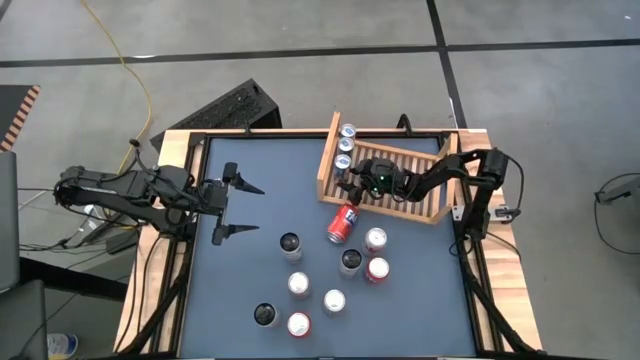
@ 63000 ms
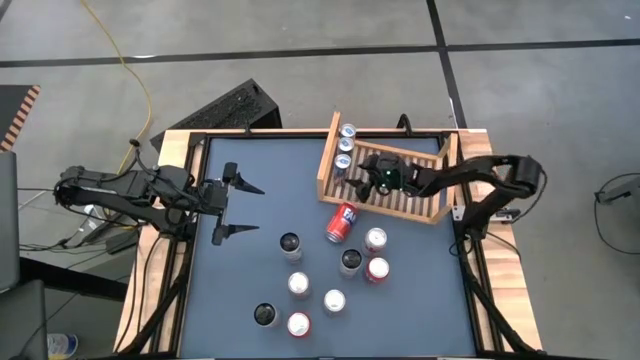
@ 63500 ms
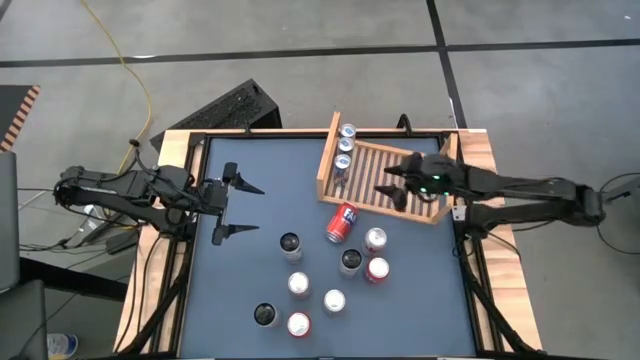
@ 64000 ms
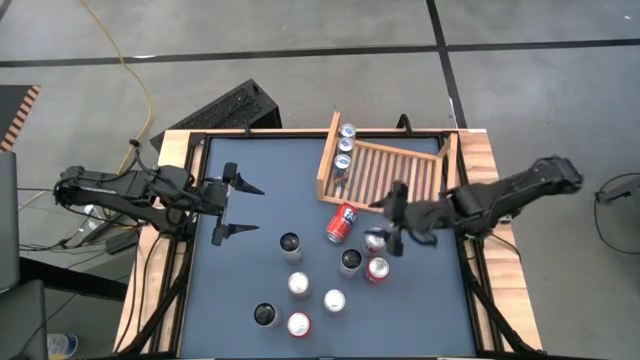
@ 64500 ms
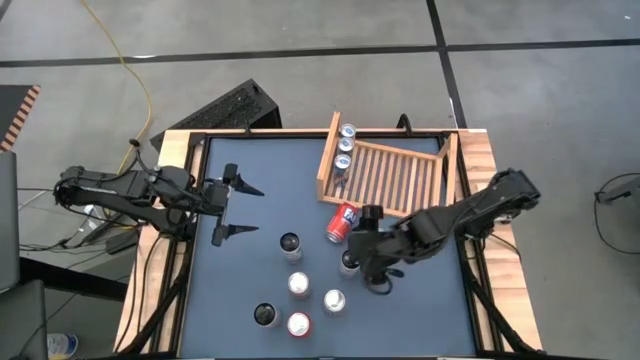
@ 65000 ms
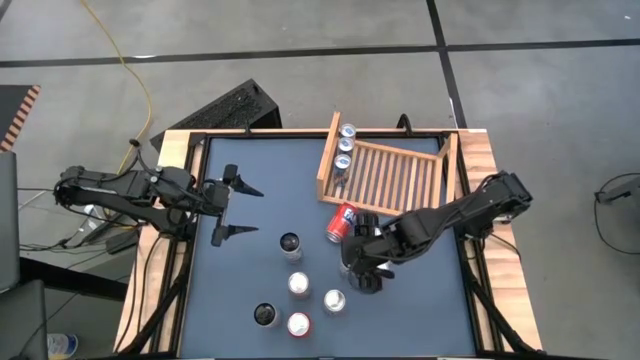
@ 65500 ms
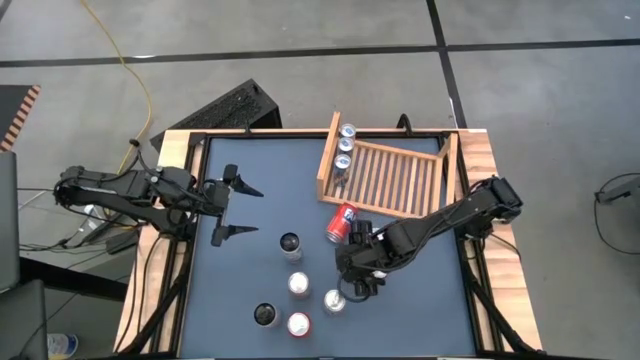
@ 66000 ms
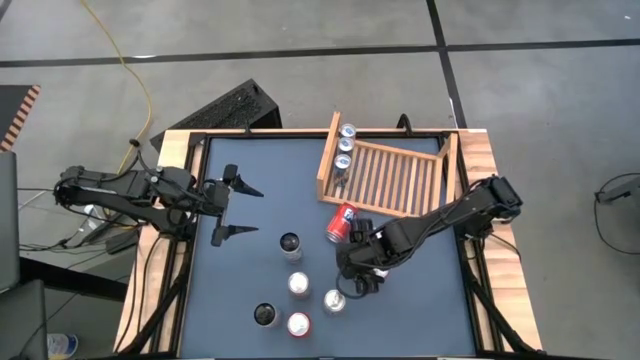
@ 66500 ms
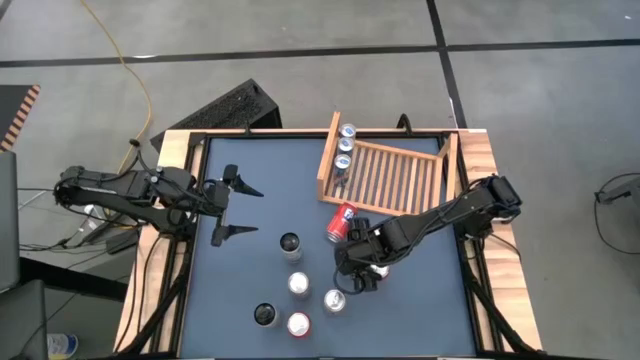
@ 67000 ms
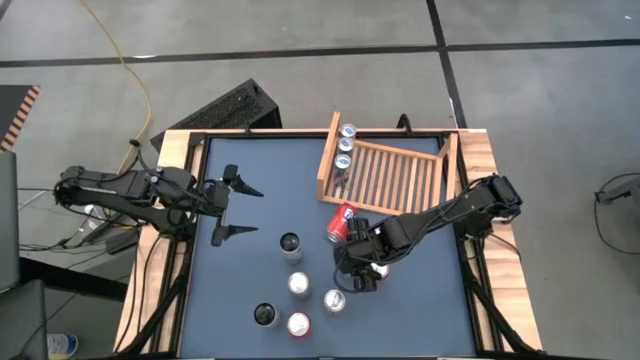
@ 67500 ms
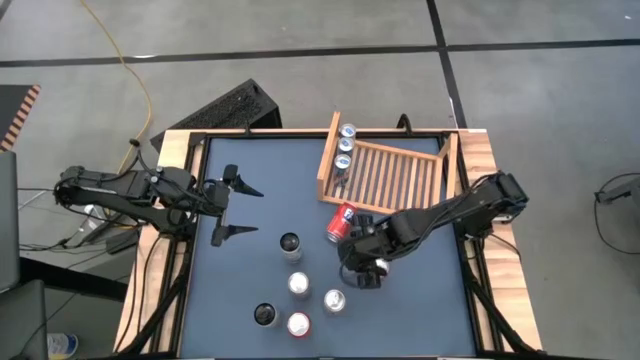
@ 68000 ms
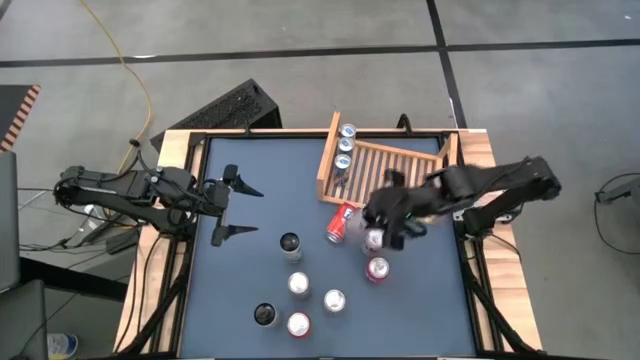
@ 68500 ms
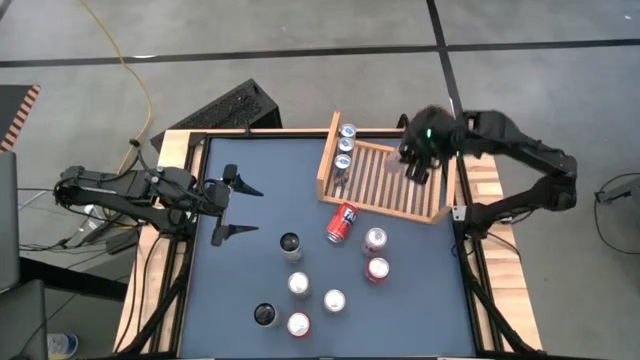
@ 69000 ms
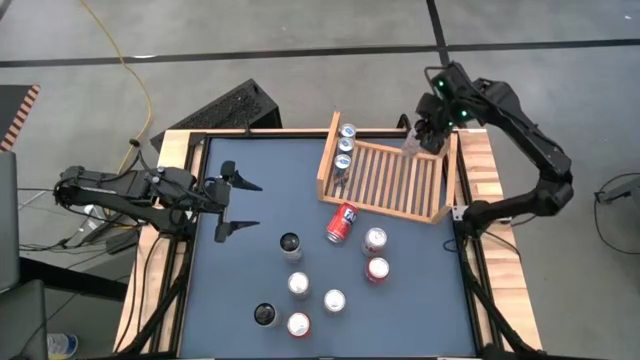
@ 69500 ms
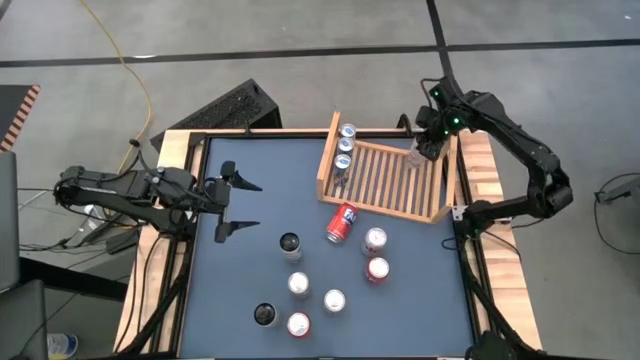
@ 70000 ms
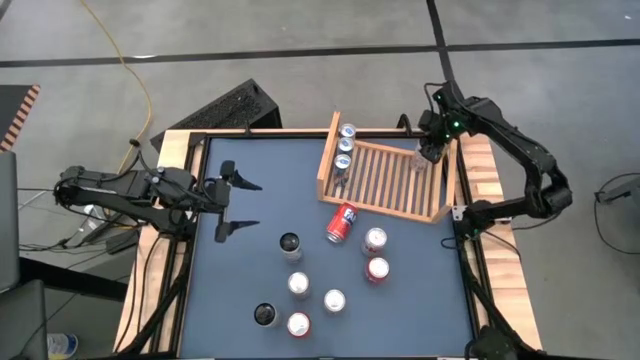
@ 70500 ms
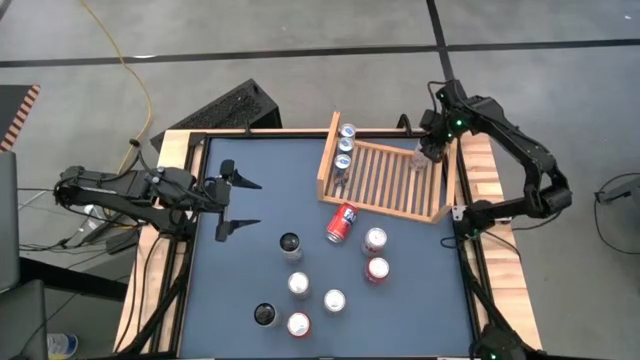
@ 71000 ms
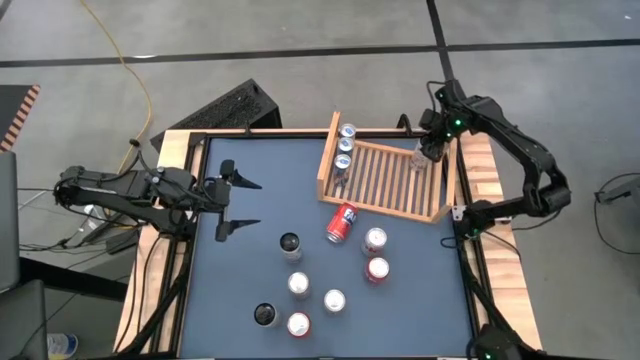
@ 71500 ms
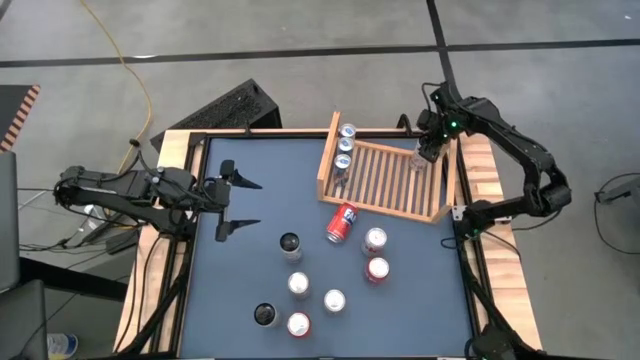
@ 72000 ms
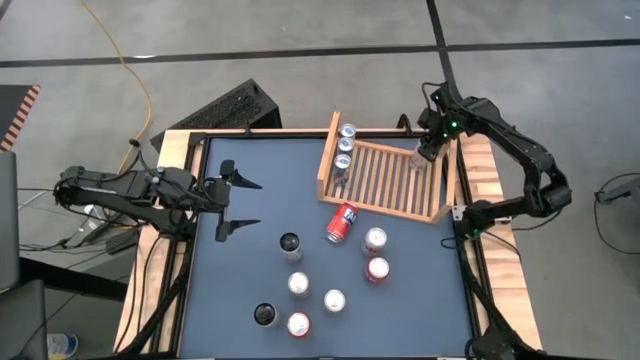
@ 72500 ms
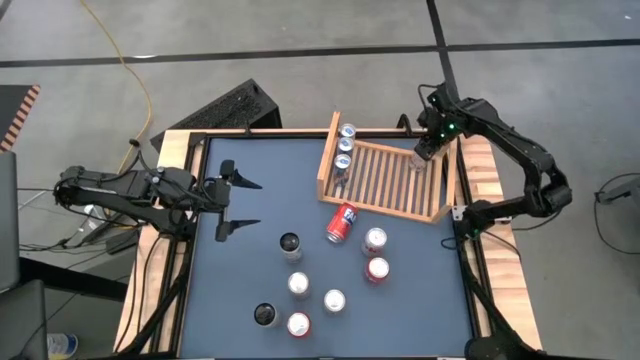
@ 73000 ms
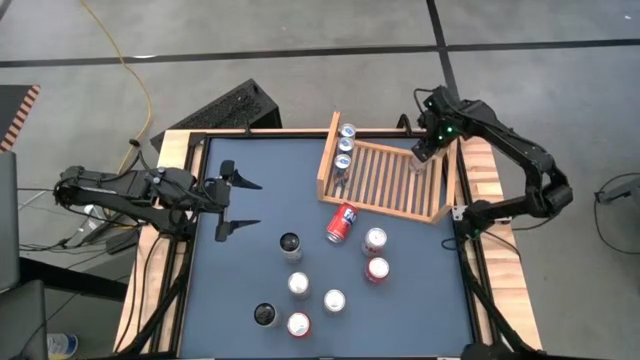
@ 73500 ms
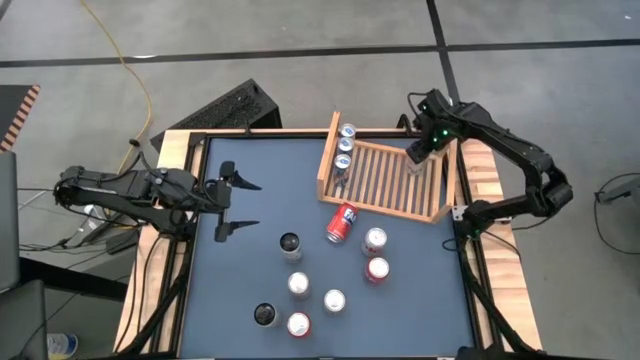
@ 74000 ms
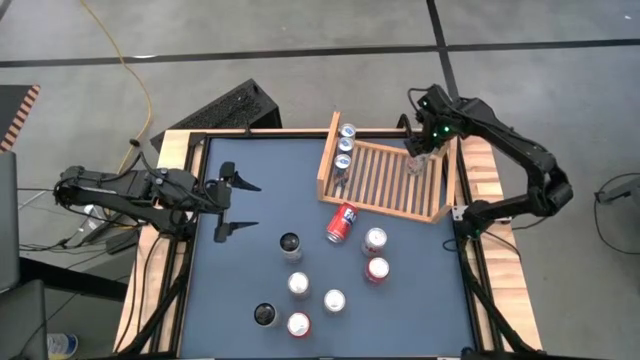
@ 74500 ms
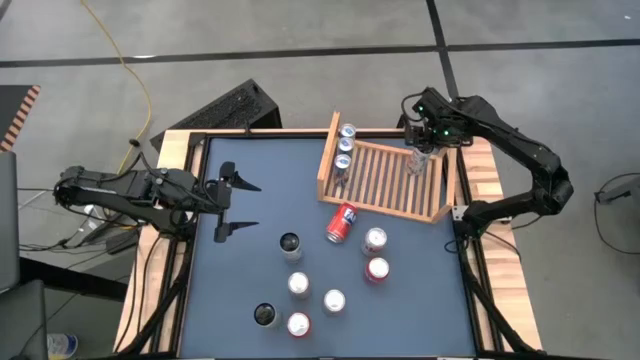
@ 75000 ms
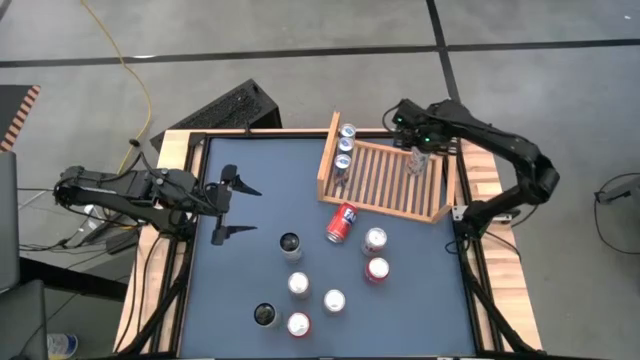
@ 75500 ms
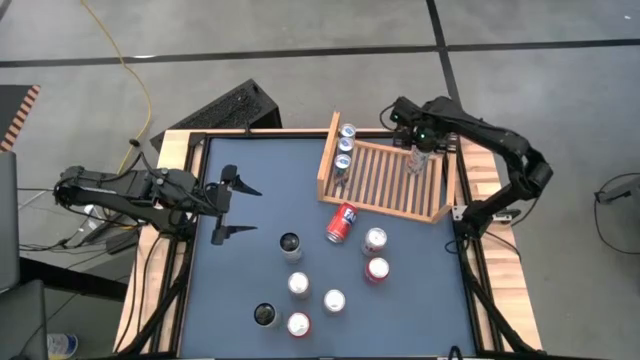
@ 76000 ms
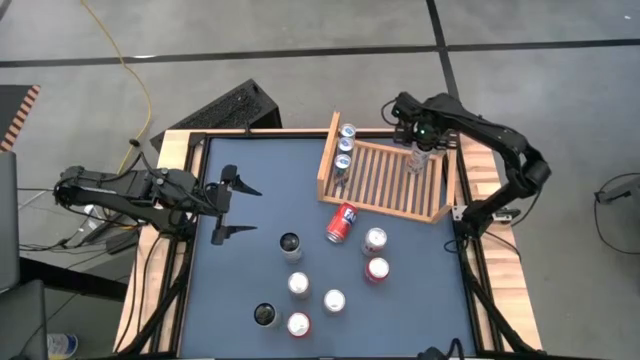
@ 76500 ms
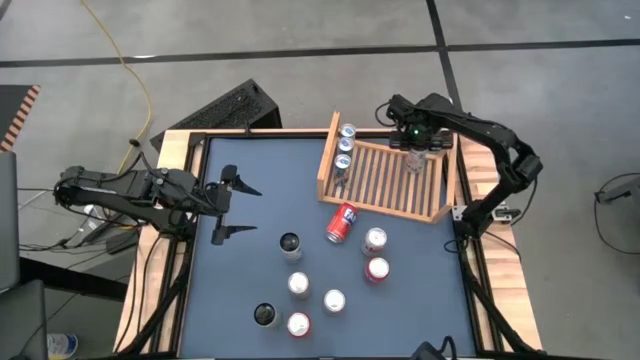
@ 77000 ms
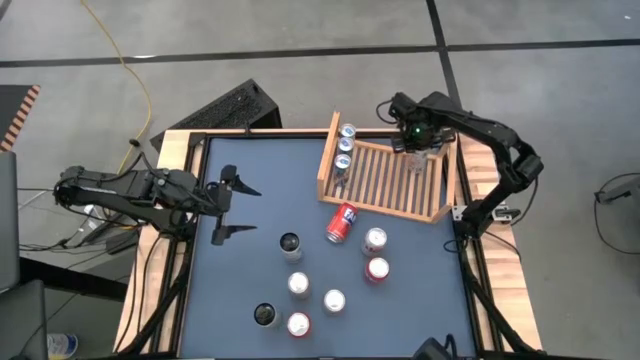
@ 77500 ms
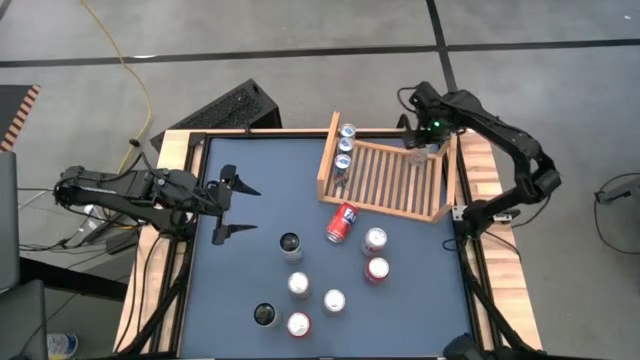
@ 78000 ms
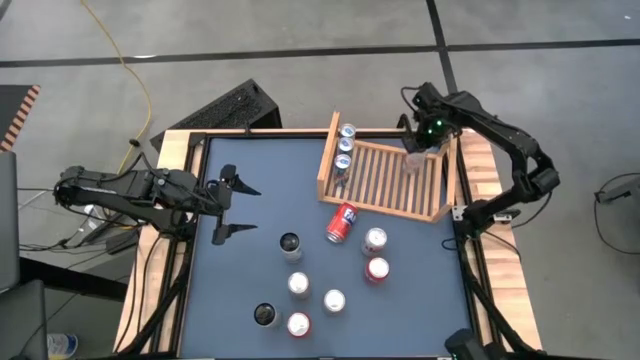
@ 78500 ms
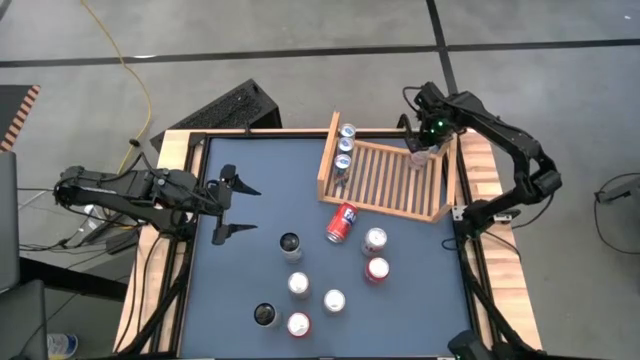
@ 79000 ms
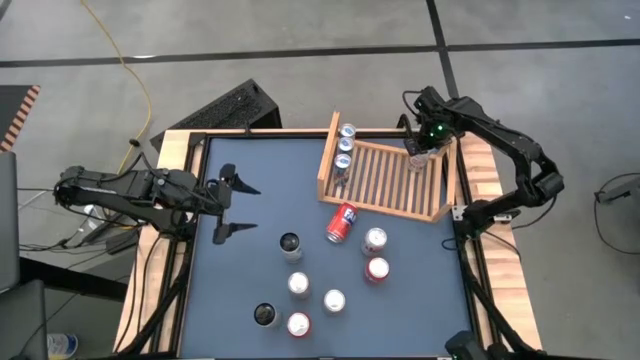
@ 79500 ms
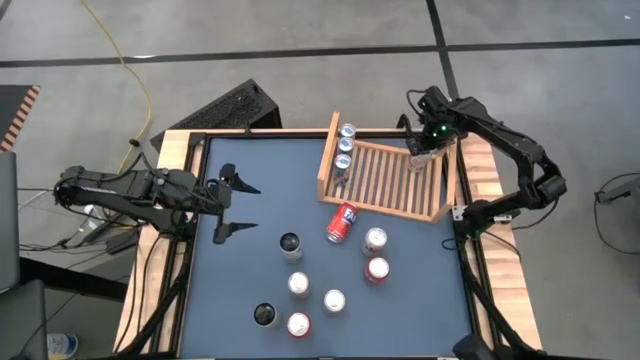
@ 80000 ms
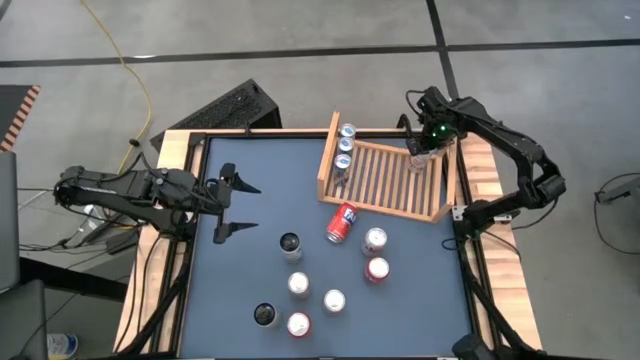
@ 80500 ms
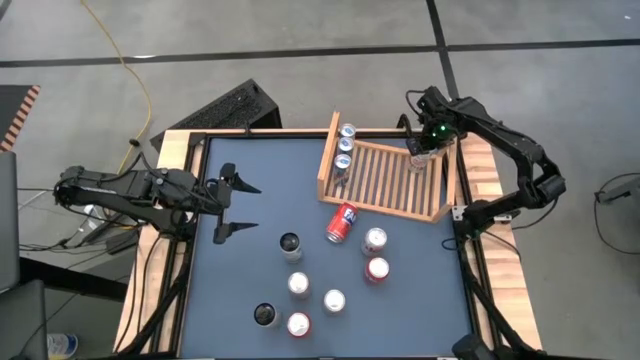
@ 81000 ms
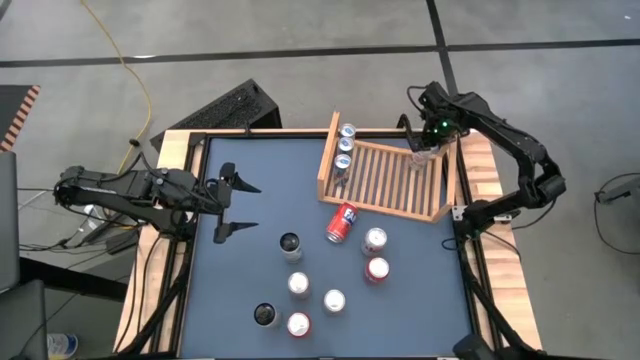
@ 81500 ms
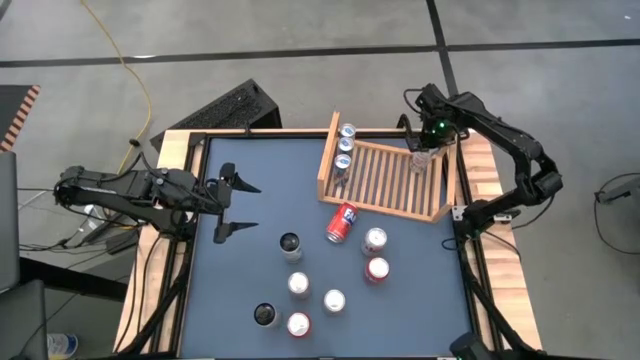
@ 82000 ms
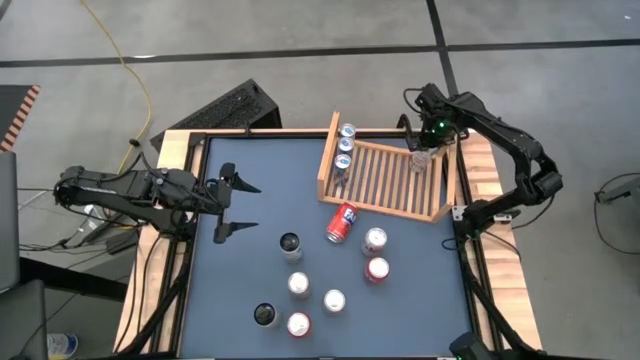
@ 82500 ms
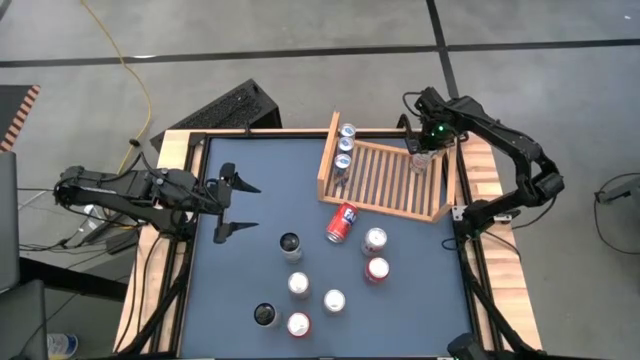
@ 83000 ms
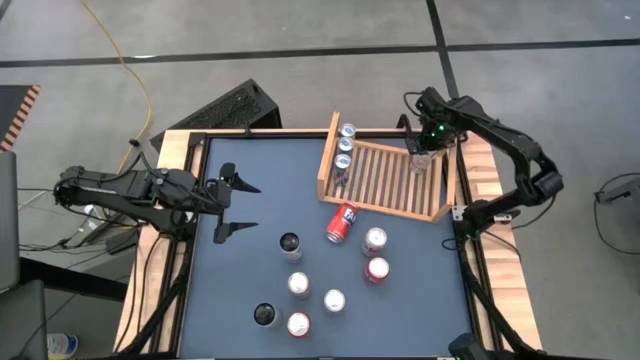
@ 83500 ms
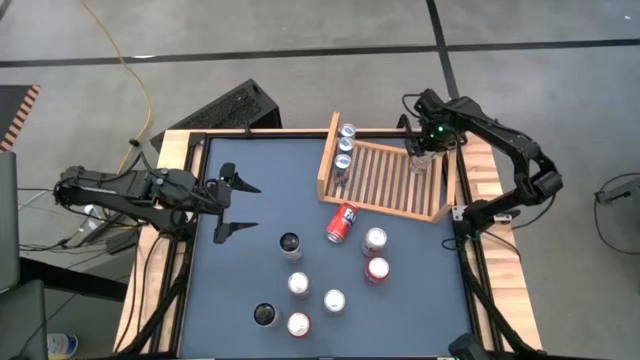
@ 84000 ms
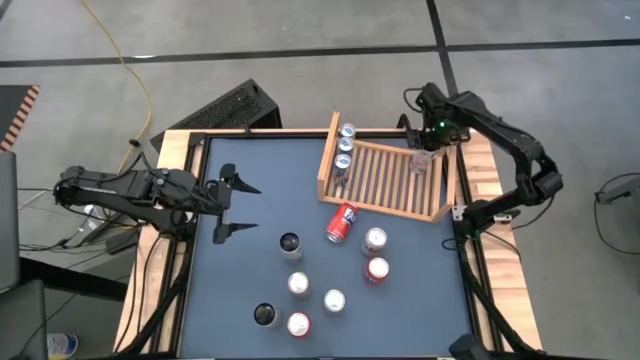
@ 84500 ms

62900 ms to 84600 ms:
Task: Place canned beverage on shelf
Put the right white and pink soda can on the shelf
